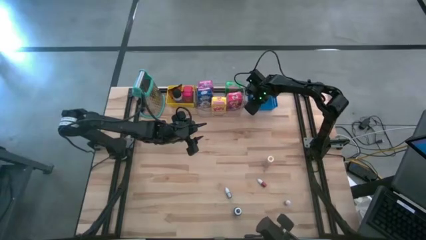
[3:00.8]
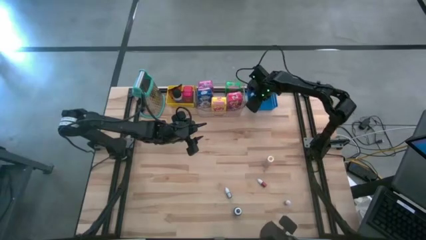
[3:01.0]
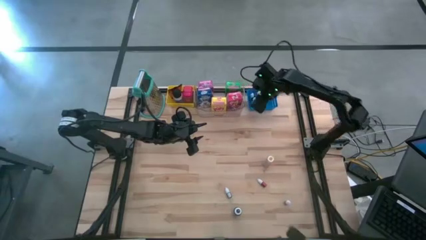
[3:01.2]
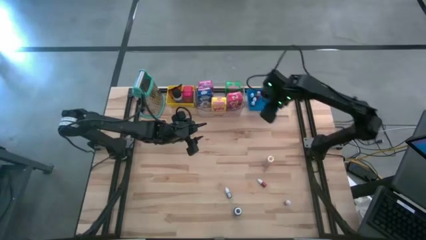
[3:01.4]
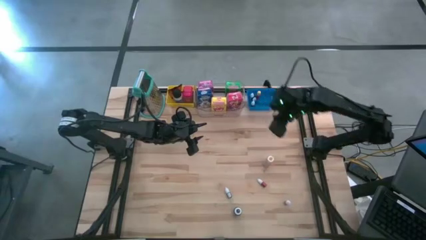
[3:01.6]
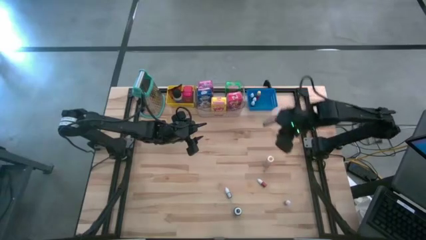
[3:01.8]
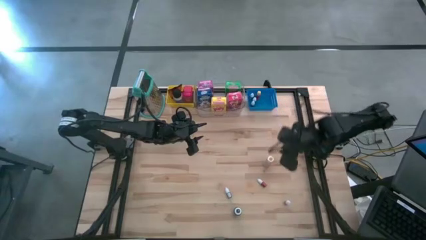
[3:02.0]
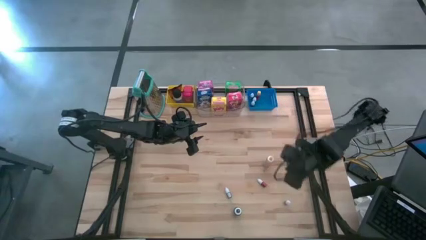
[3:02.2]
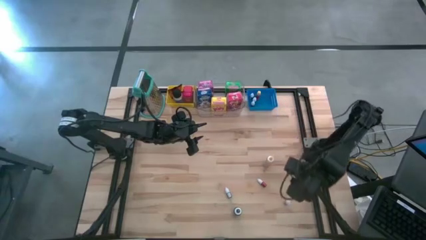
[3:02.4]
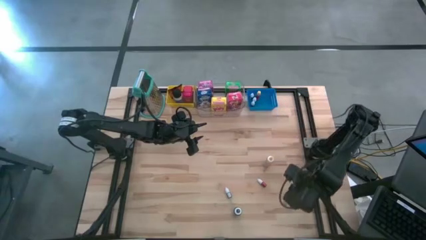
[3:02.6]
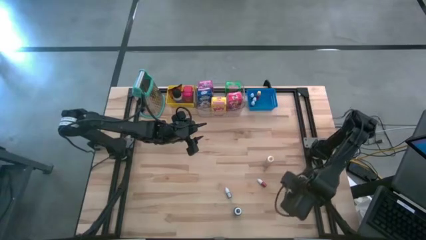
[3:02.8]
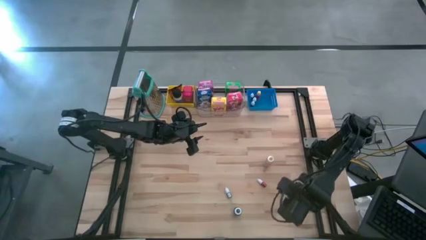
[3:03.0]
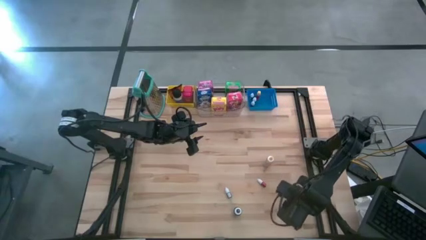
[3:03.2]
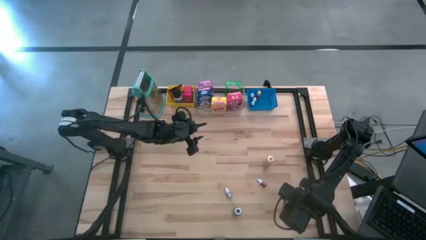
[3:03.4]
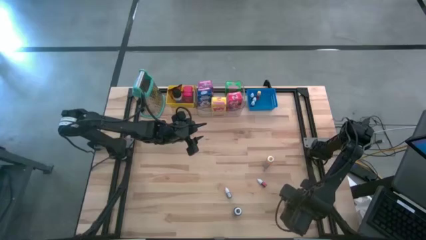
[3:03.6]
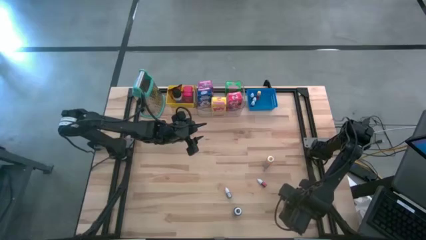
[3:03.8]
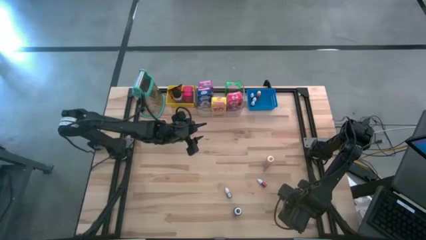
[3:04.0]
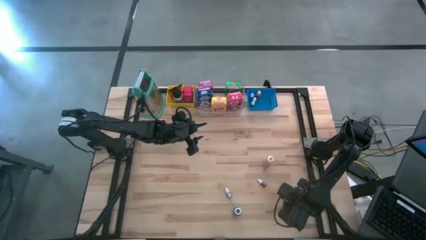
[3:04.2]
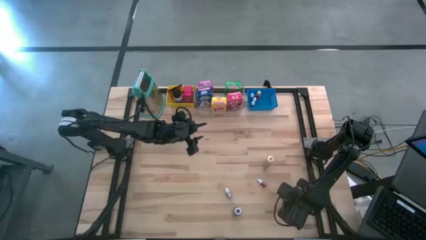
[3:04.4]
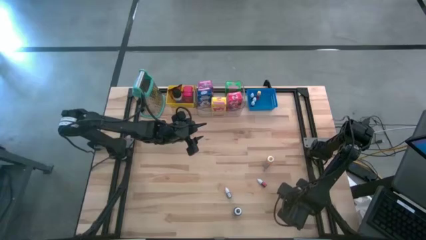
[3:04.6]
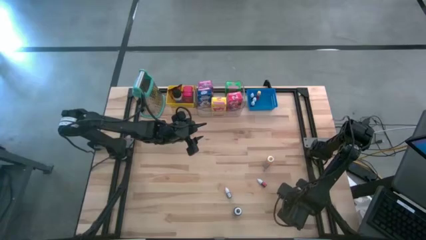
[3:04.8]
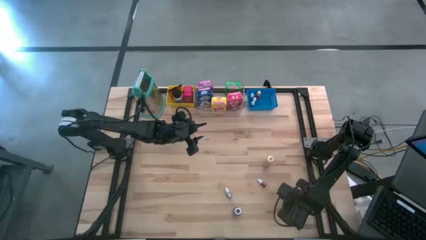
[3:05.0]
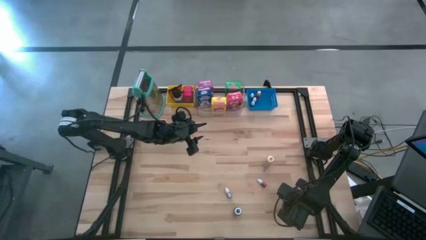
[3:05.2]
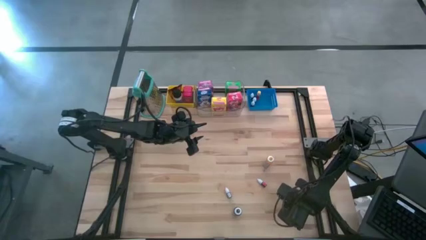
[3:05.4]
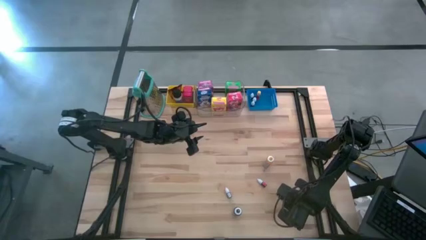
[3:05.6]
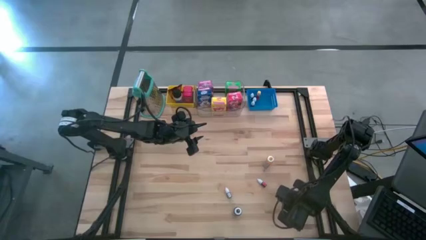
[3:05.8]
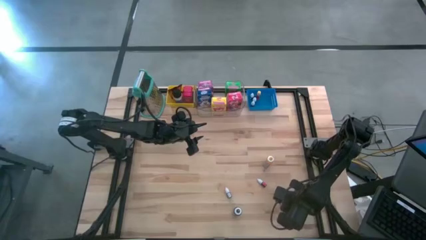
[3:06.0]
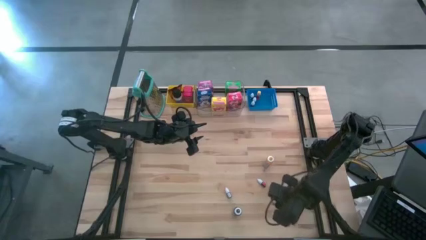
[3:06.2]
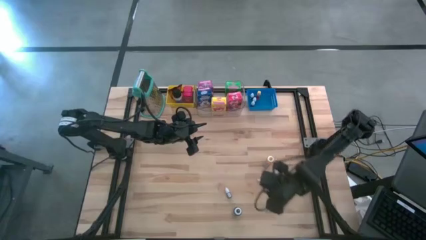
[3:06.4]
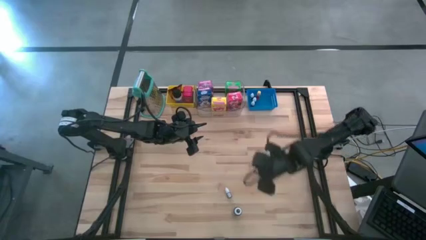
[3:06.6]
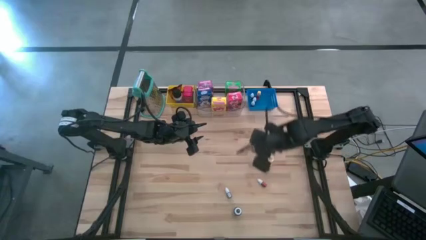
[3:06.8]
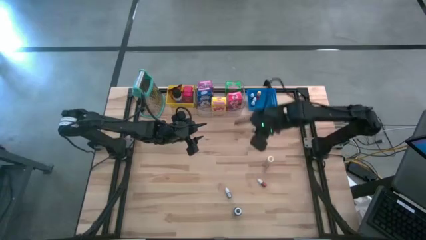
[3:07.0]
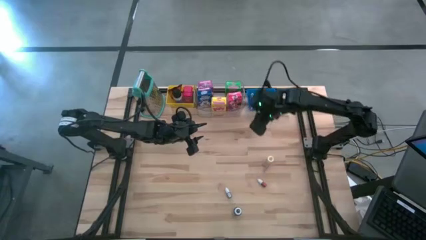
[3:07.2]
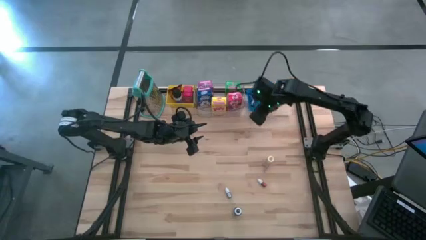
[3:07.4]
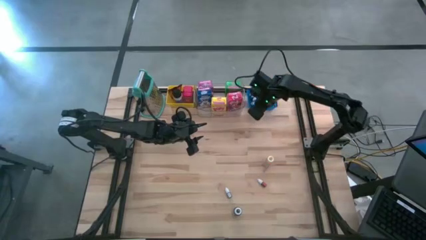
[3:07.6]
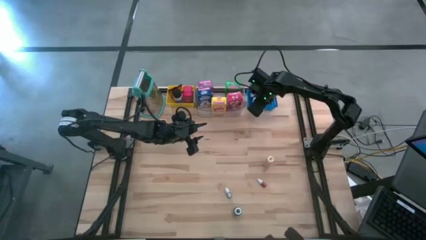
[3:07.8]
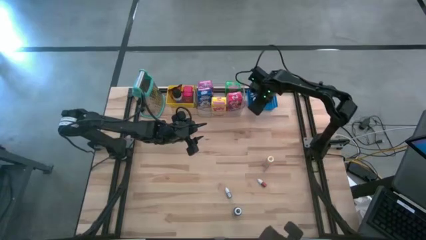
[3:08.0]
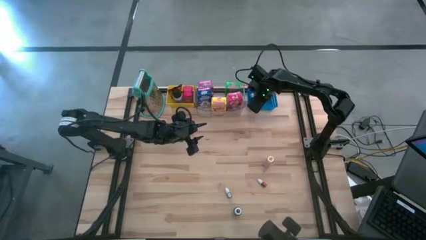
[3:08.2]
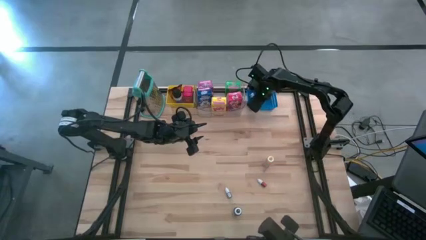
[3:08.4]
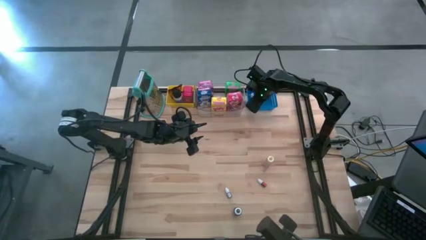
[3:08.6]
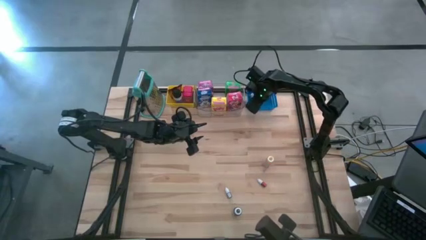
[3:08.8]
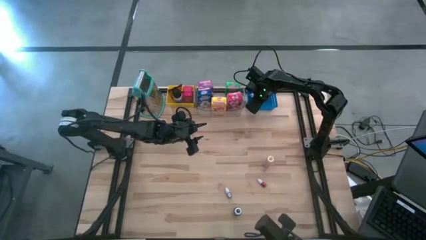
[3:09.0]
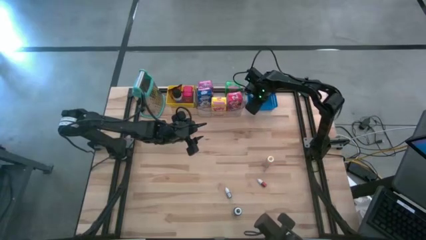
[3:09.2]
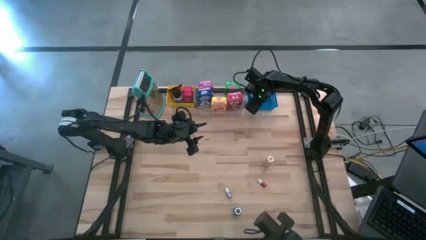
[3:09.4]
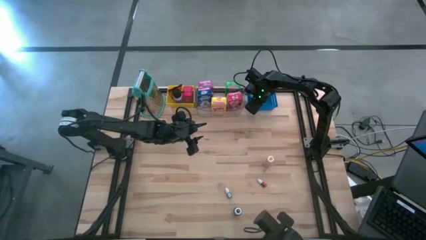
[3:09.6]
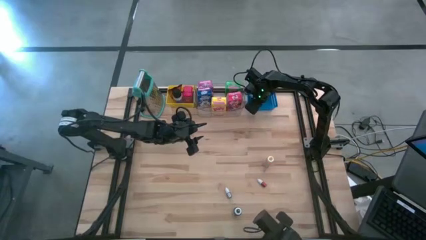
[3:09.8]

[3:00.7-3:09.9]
Task: Pick & Place Kitchen Items
Put the right orange bottle into the blue bin
